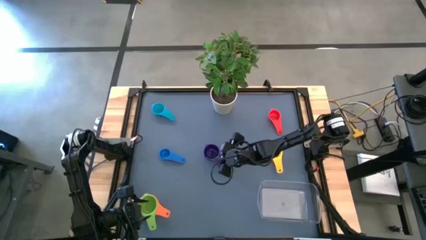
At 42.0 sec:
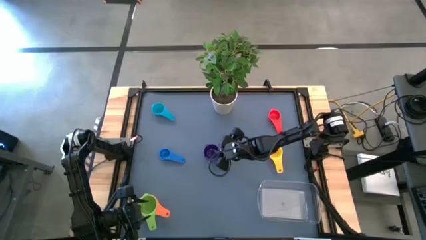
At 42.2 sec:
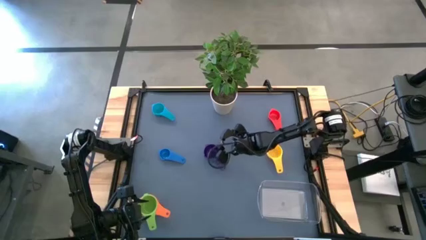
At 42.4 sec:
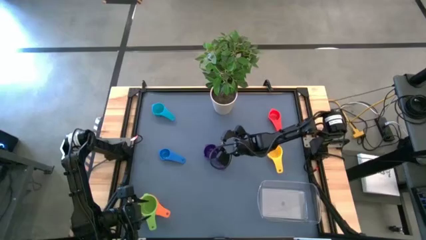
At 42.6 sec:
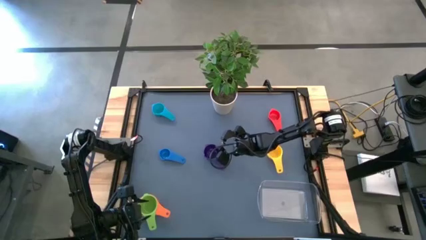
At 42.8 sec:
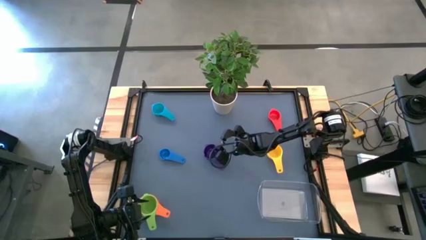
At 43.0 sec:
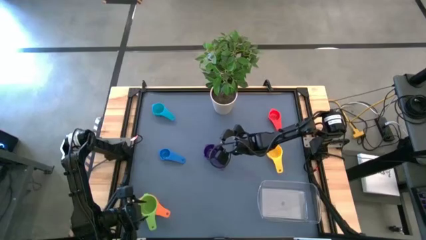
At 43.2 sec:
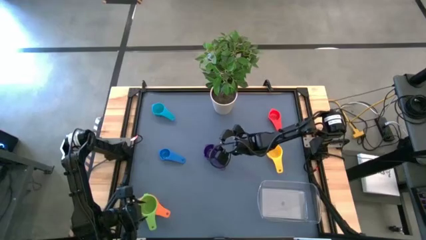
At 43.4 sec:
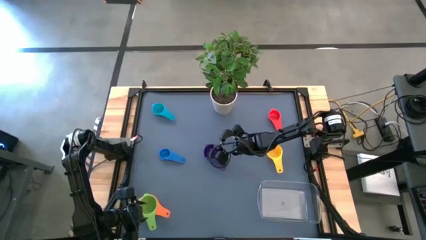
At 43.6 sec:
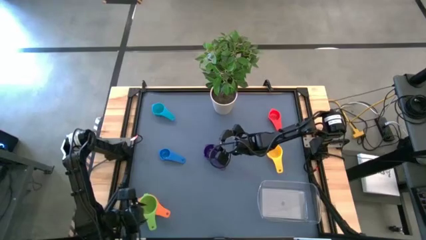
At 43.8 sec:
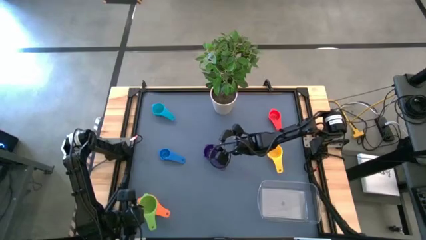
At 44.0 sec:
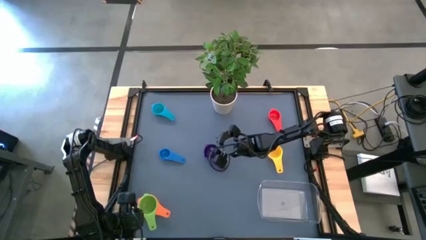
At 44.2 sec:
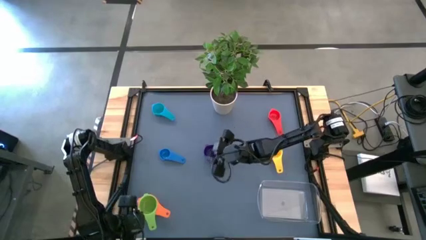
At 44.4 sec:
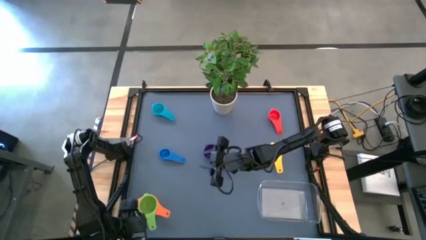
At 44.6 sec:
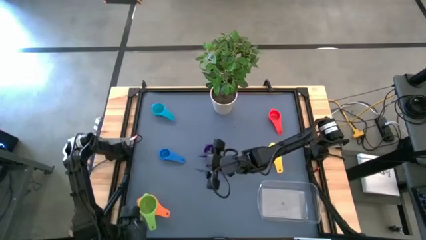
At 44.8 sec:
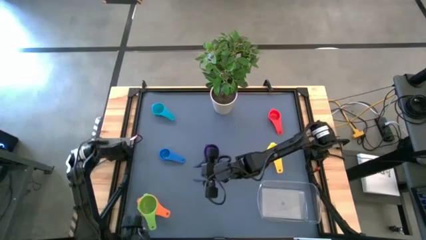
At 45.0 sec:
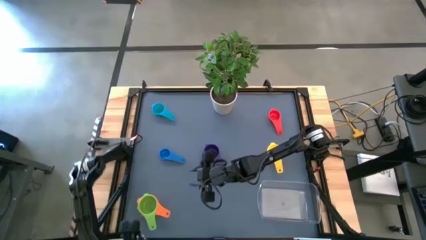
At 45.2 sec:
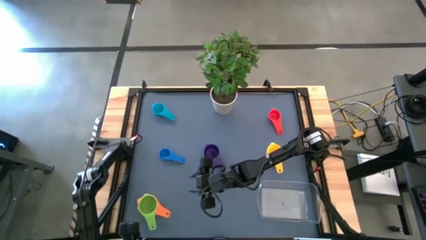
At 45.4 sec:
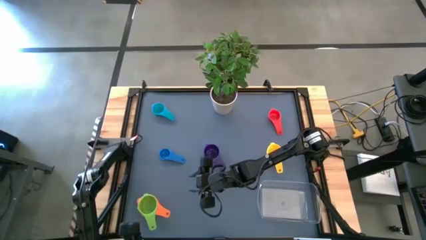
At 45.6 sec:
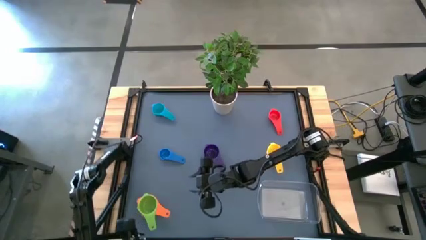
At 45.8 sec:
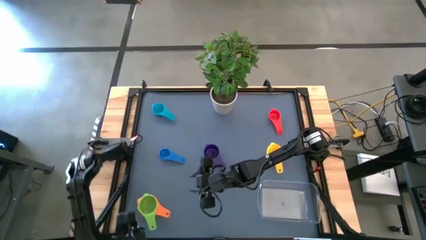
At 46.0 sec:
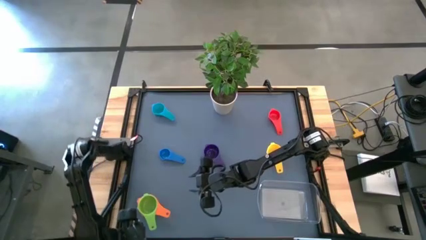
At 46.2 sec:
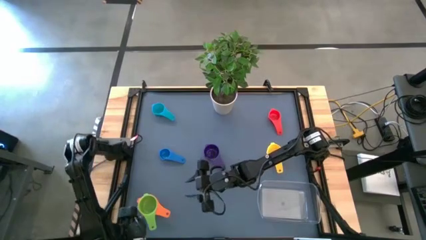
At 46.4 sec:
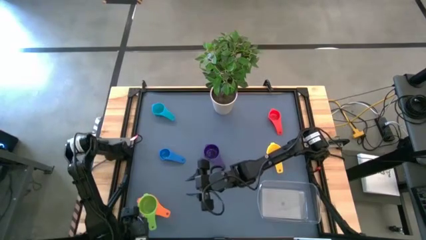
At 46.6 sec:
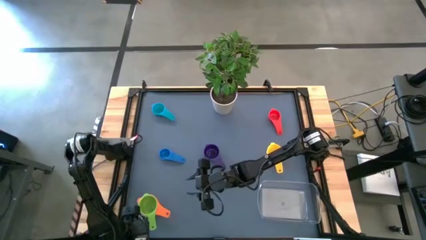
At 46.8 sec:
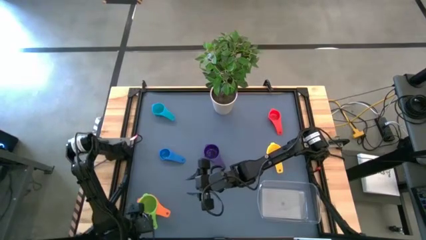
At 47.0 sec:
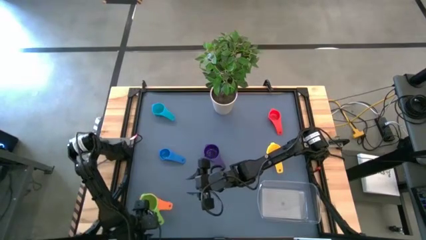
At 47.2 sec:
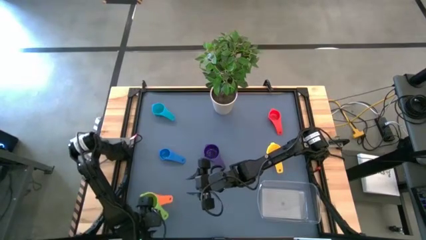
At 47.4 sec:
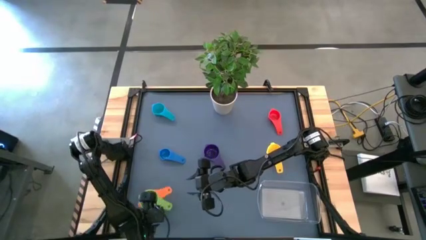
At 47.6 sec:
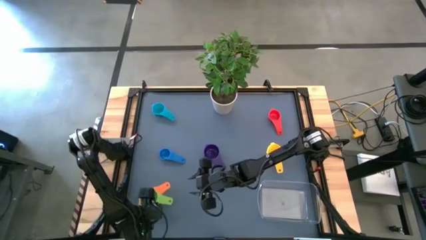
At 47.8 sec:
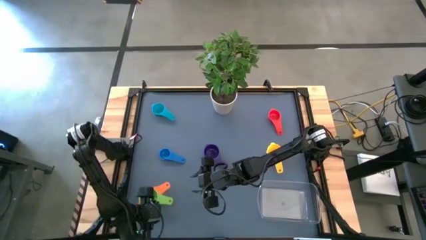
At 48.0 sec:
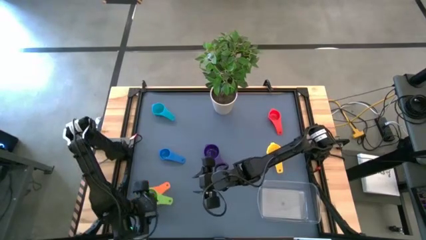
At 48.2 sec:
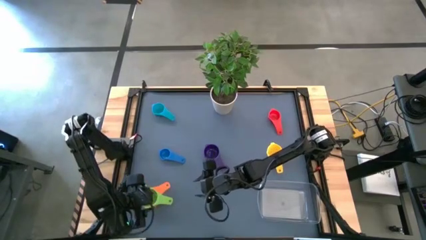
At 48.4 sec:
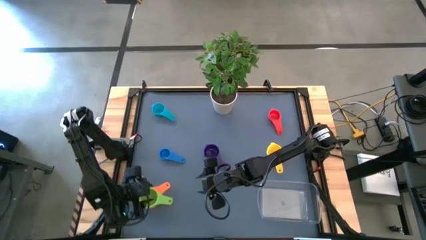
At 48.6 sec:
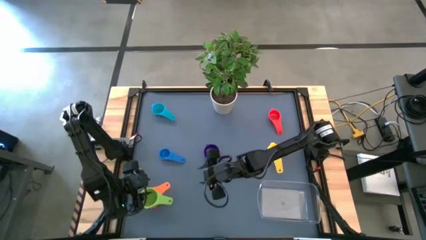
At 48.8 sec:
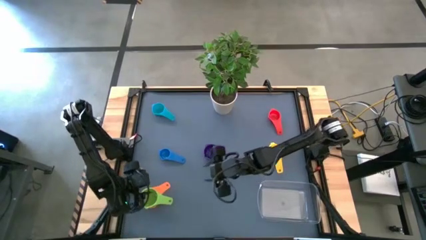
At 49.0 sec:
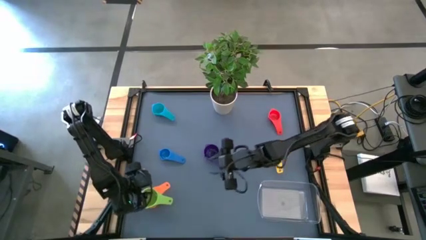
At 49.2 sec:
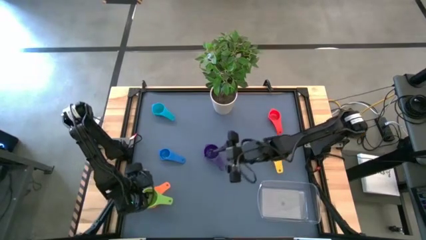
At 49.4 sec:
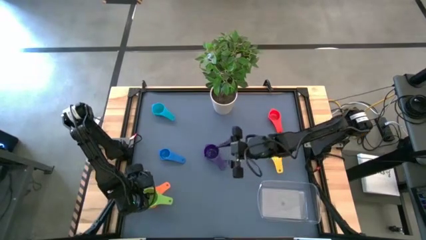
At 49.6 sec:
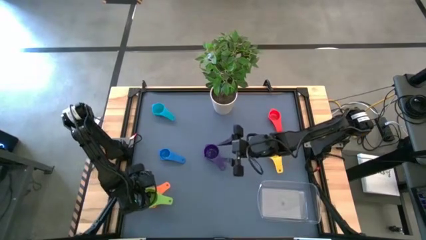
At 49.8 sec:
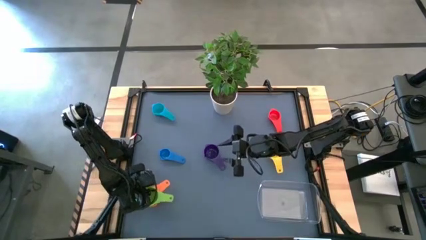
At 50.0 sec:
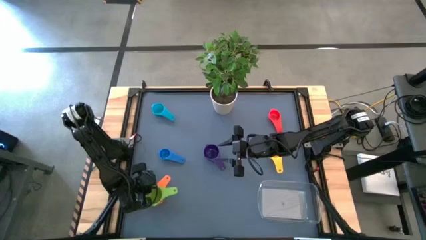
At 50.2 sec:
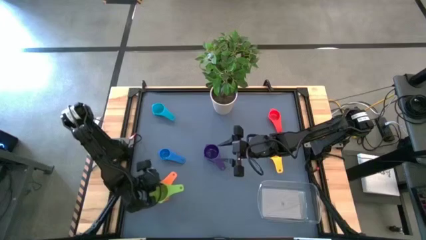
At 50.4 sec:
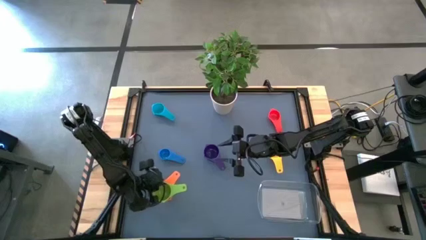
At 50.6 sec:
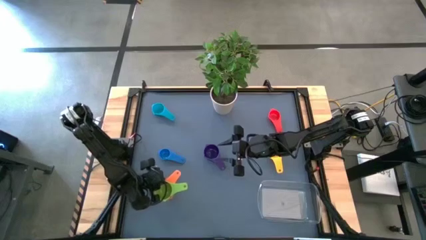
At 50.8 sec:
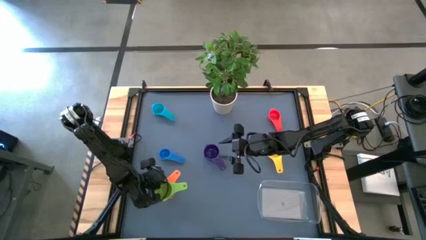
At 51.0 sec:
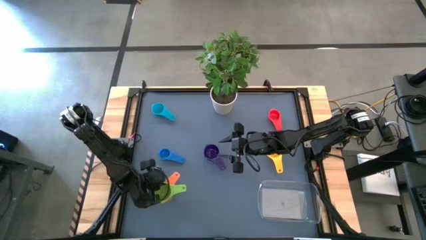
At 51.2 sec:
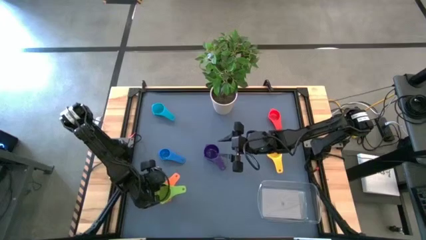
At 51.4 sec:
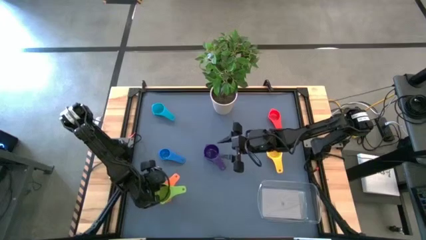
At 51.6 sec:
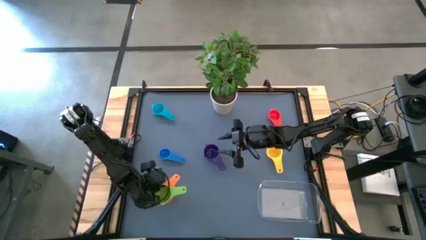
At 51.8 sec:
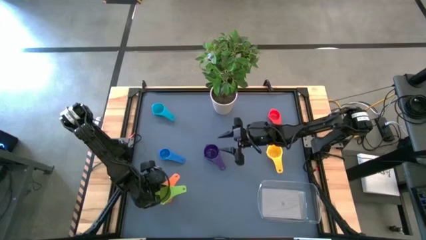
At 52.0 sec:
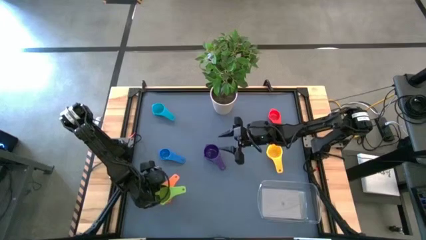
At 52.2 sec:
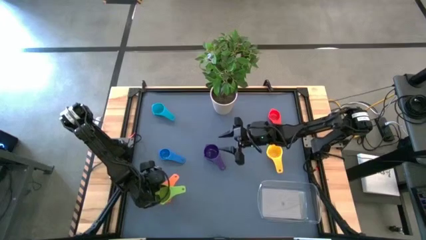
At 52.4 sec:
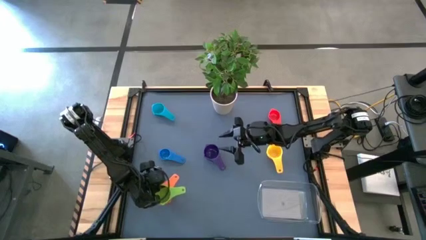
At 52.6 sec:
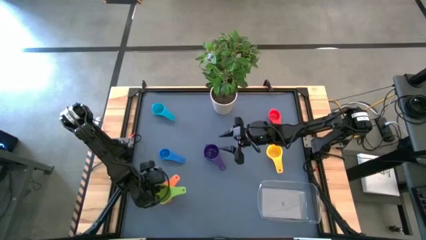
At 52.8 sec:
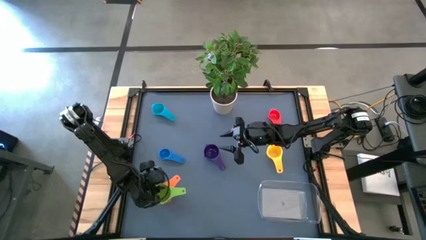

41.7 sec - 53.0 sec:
Task: Nest measuring cups in basket
Adjust the nested measuring cups
